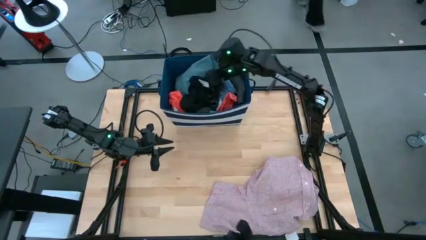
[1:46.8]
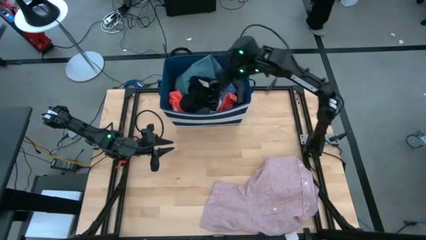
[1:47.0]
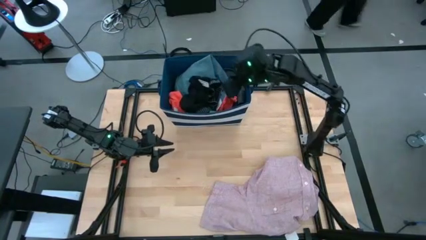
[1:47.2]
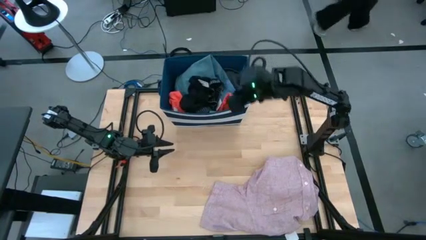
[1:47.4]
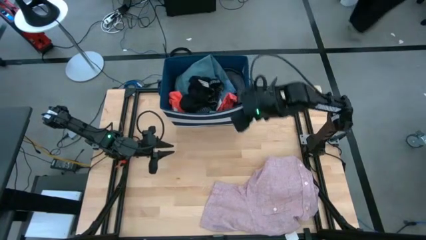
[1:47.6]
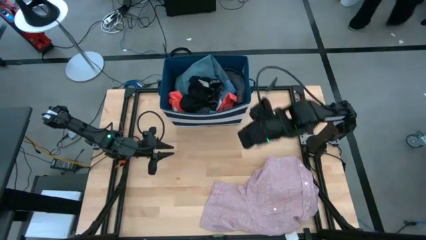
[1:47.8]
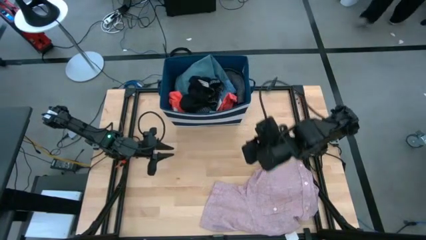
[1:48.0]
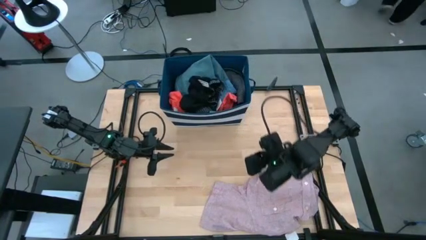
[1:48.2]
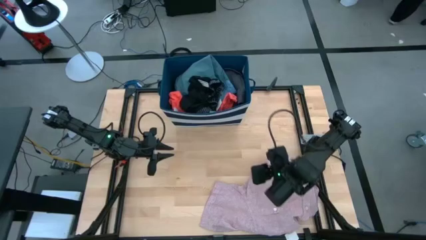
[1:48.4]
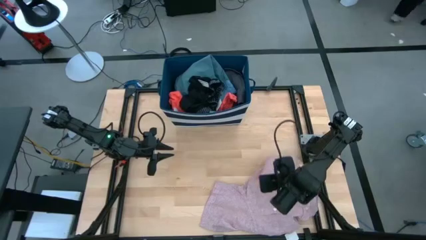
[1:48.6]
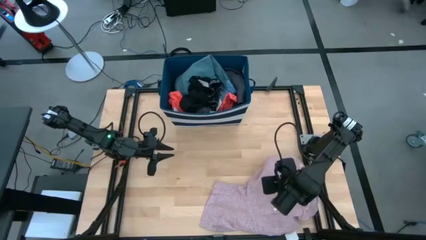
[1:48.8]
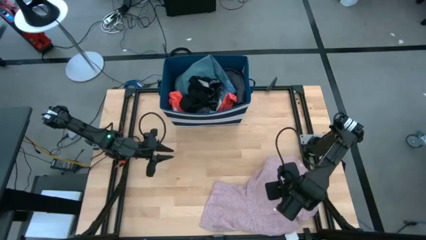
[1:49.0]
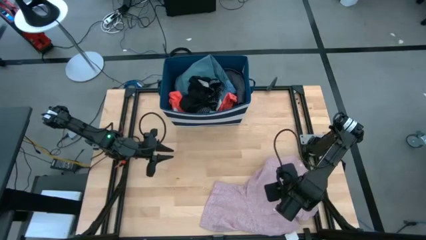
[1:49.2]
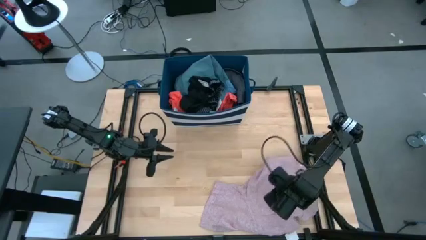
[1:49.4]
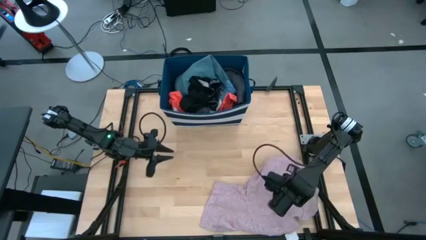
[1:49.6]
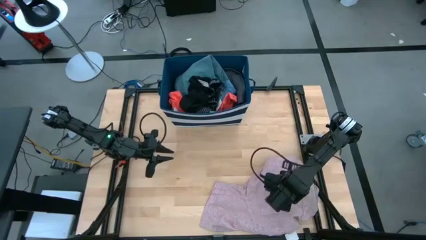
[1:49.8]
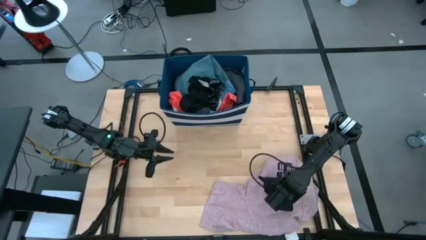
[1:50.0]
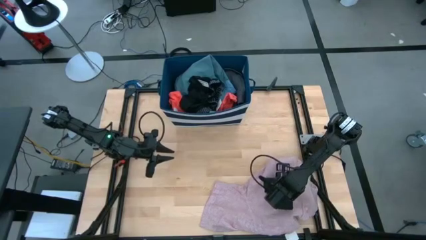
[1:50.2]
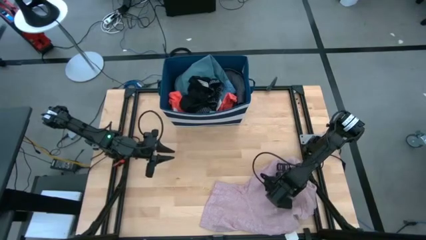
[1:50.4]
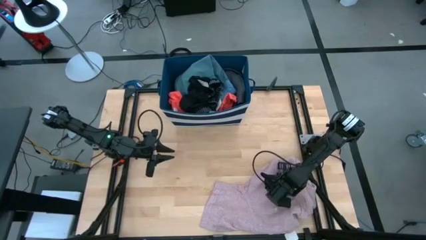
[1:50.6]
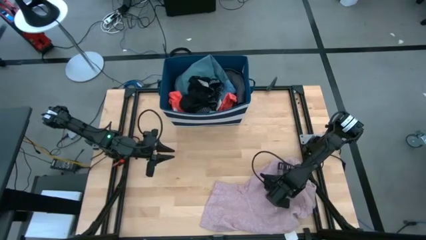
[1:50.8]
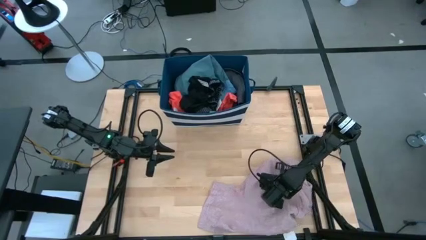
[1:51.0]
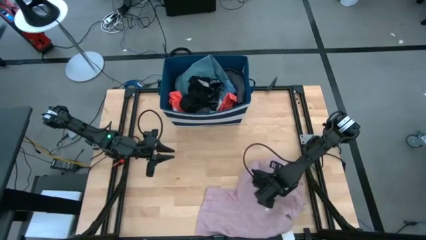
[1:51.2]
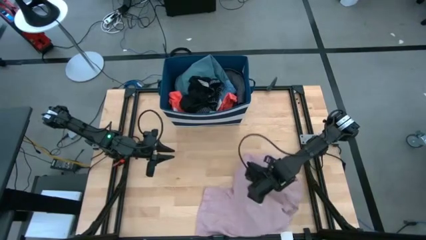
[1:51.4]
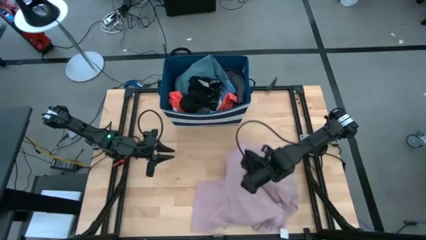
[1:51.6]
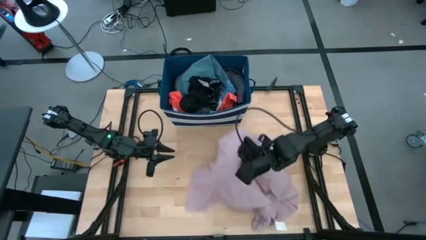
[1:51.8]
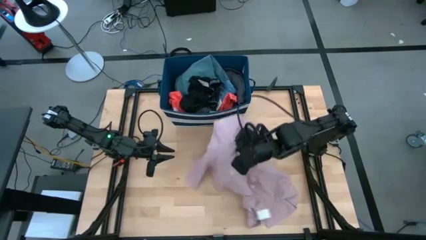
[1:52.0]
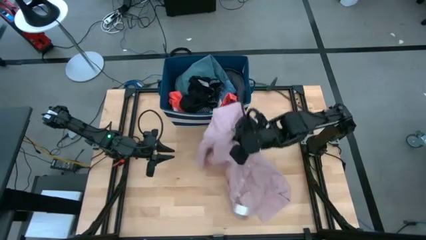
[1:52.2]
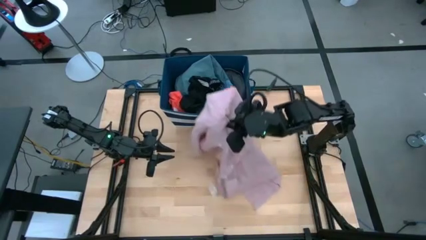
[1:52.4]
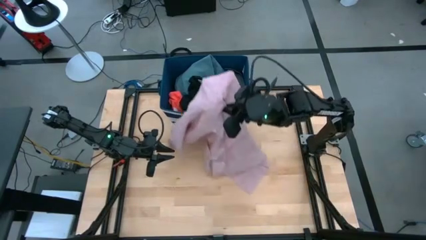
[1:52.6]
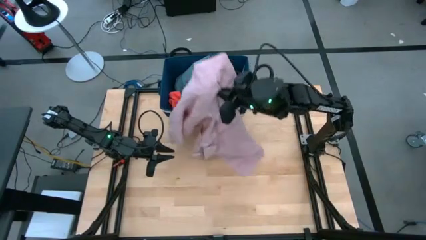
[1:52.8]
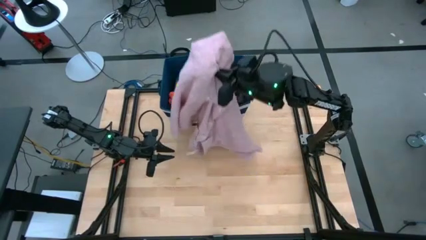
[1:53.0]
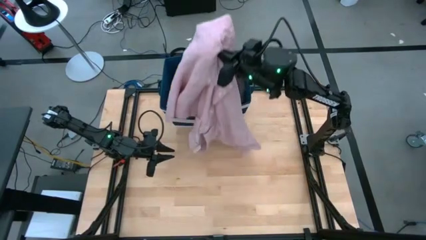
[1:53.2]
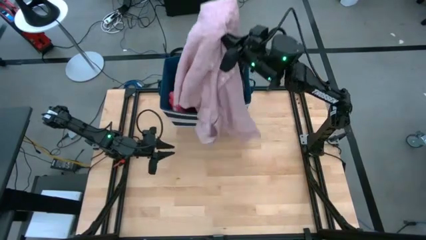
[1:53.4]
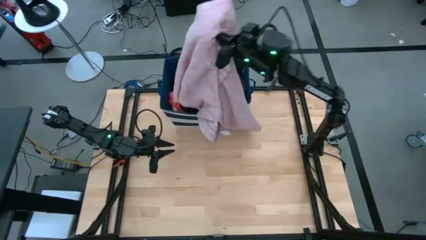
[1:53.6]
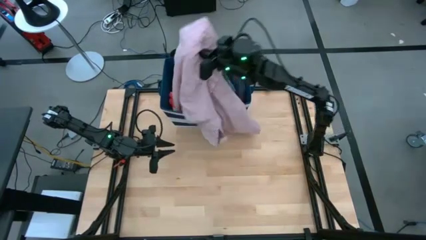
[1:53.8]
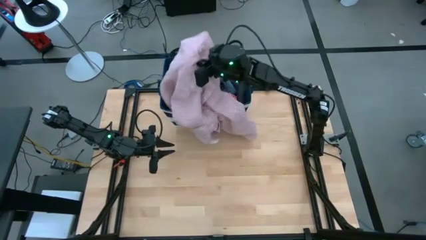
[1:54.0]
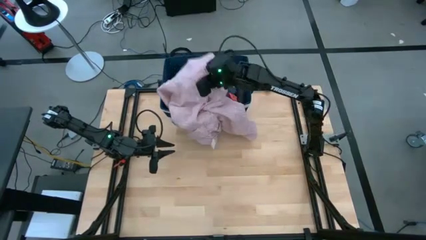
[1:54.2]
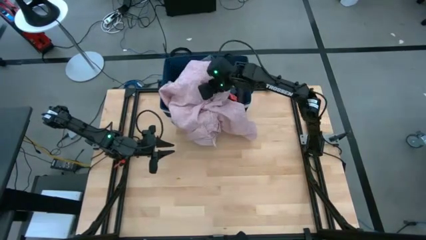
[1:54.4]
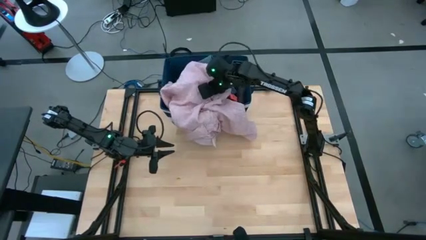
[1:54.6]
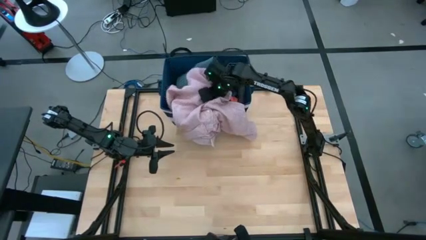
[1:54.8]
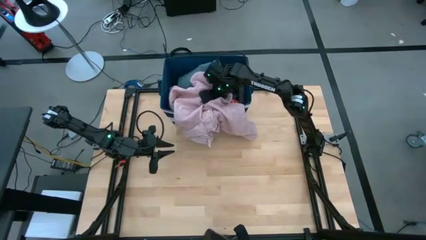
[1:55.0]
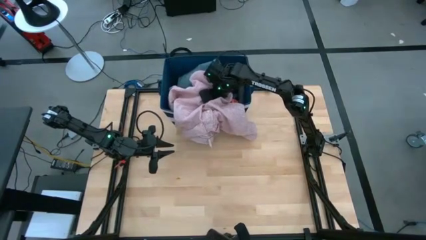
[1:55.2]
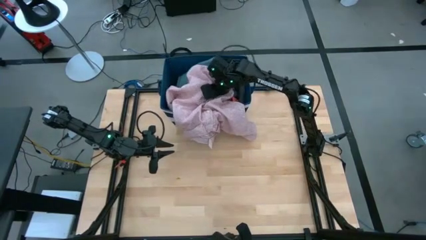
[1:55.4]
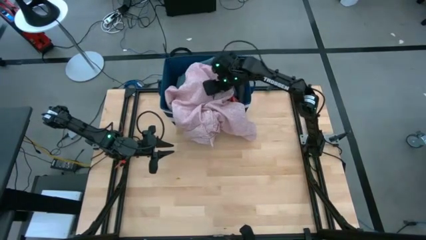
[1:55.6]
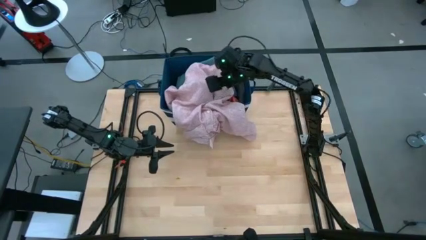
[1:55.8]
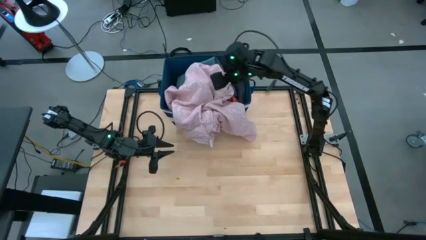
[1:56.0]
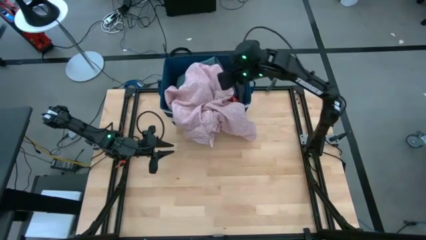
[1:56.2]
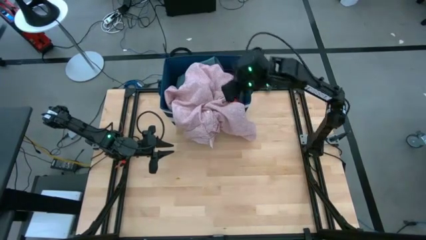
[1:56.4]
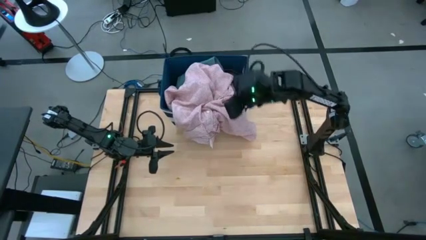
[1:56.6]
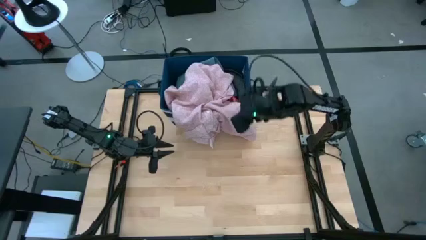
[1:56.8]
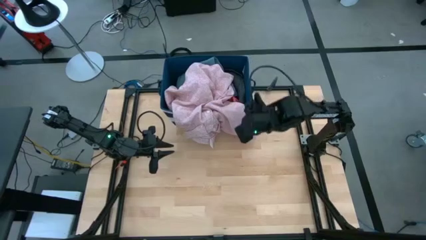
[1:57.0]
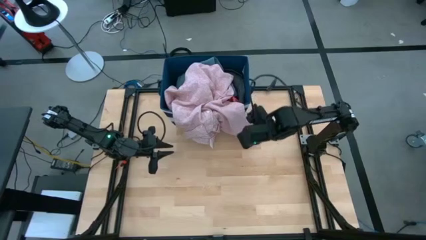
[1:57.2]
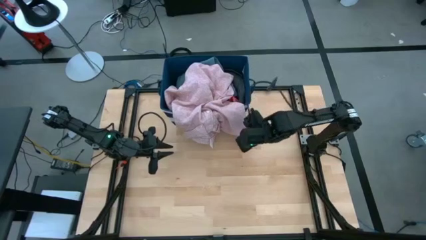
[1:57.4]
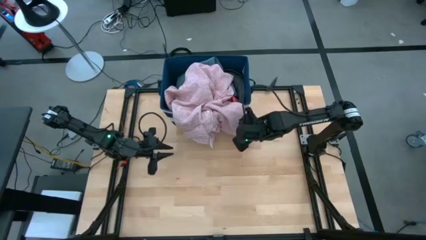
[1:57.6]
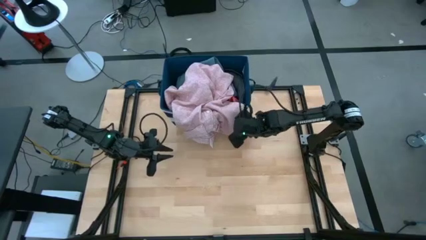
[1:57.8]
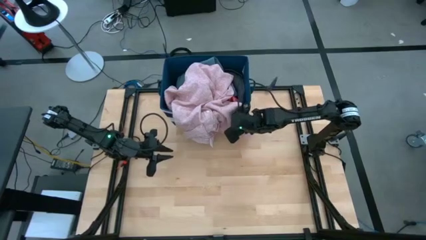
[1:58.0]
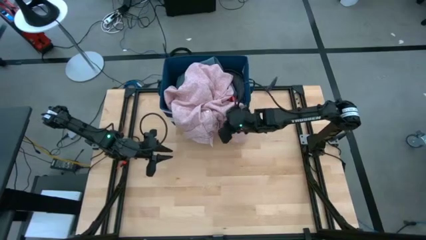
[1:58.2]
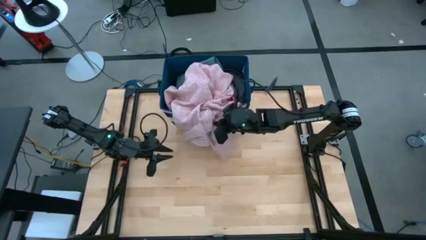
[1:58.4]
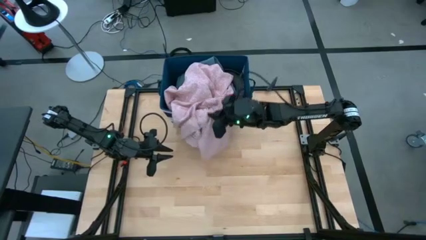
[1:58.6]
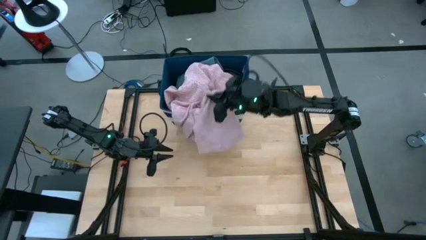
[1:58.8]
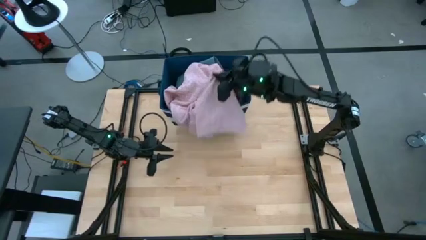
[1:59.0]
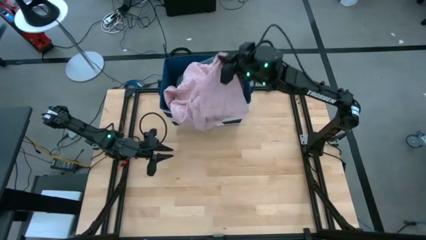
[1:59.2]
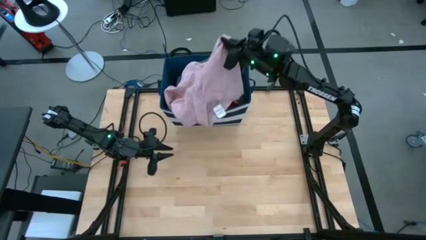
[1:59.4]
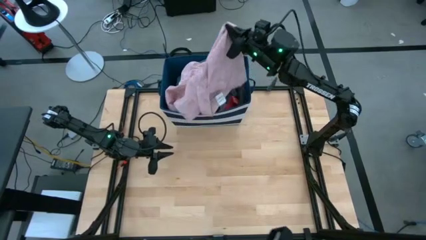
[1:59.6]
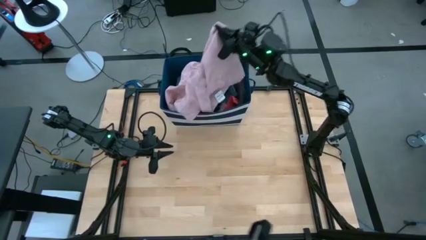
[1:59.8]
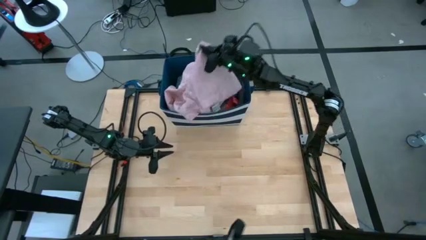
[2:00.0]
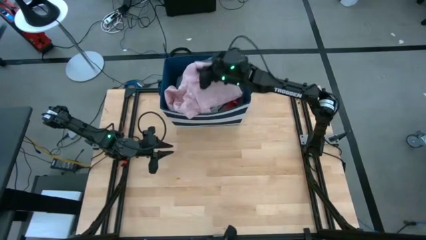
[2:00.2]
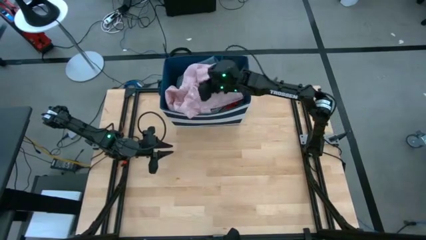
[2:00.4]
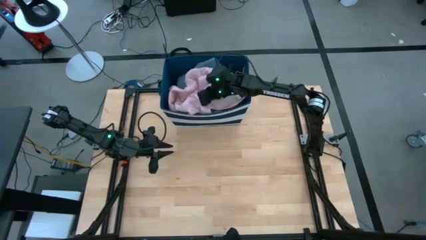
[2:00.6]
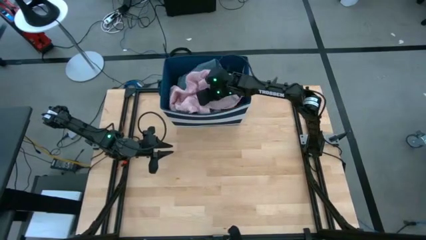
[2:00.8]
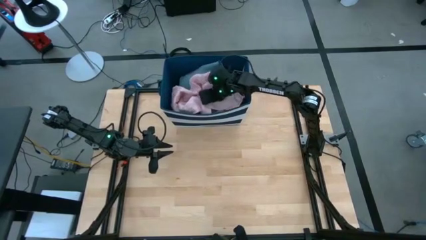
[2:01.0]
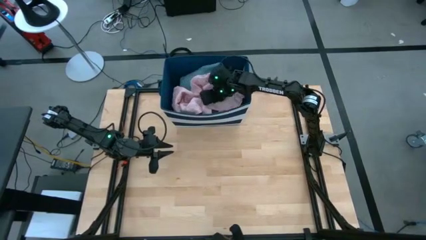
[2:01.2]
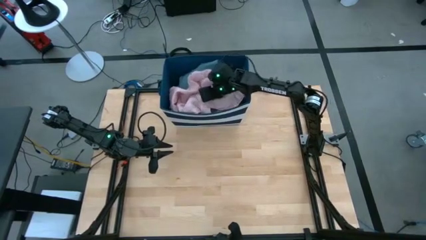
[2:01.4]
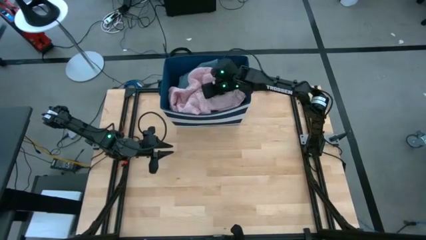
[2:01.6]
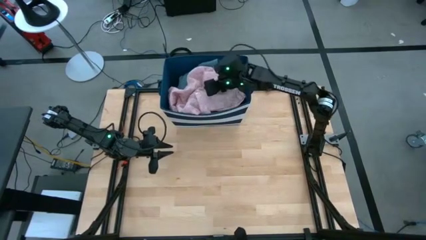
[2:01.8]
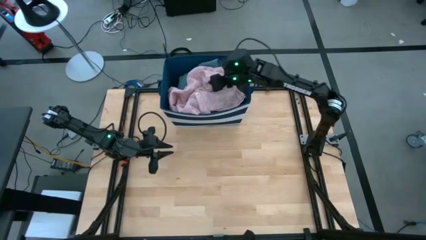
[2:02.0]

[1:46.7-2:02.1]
Task: Sort clothes
Put the pink polo shirt into the blue bin
